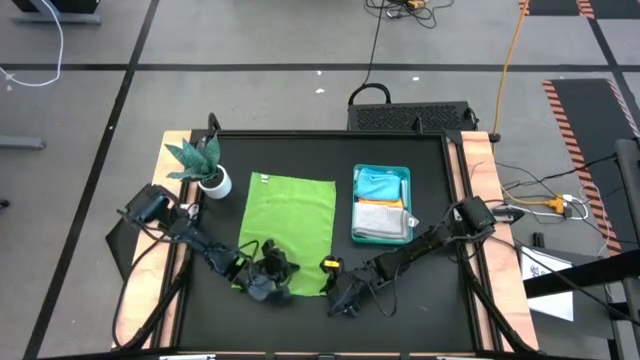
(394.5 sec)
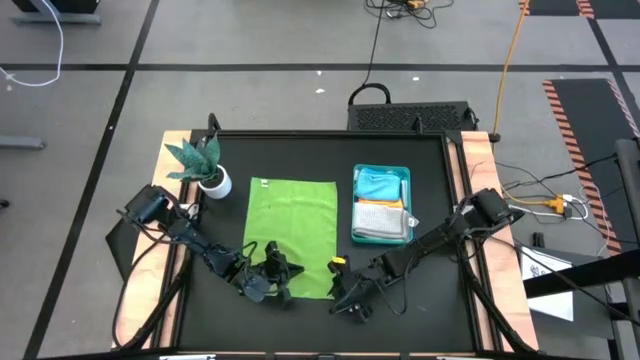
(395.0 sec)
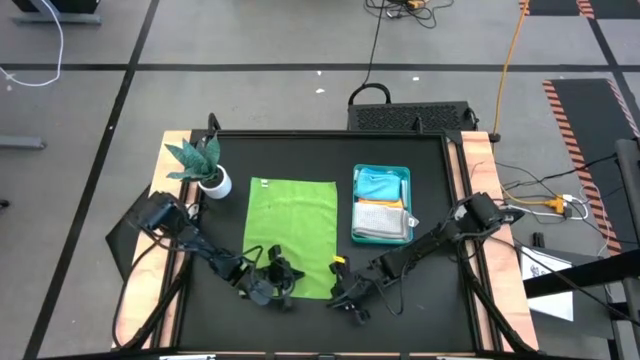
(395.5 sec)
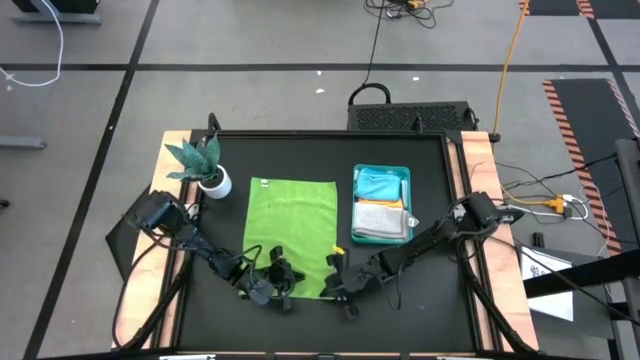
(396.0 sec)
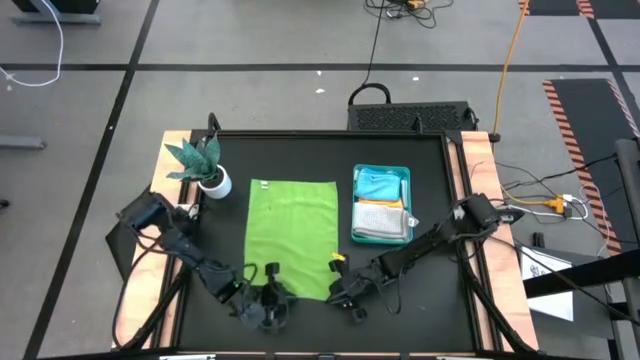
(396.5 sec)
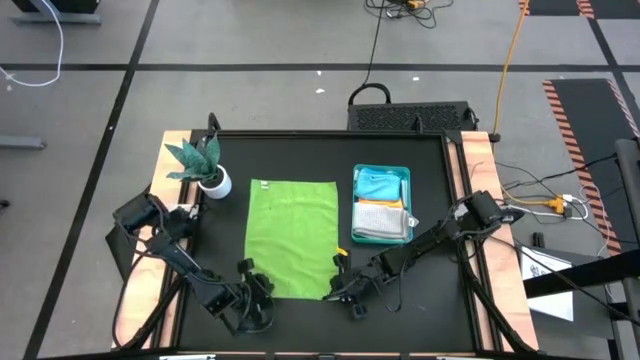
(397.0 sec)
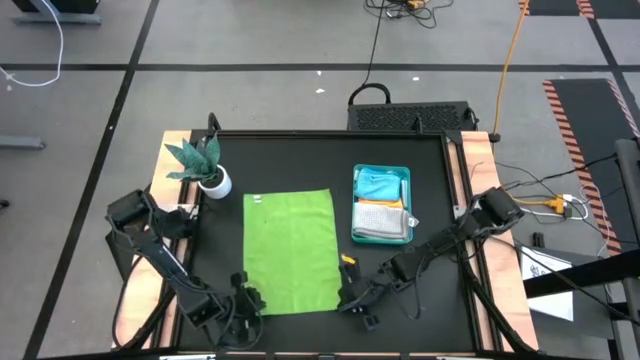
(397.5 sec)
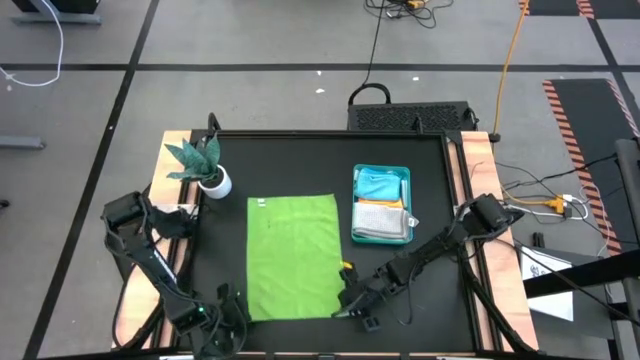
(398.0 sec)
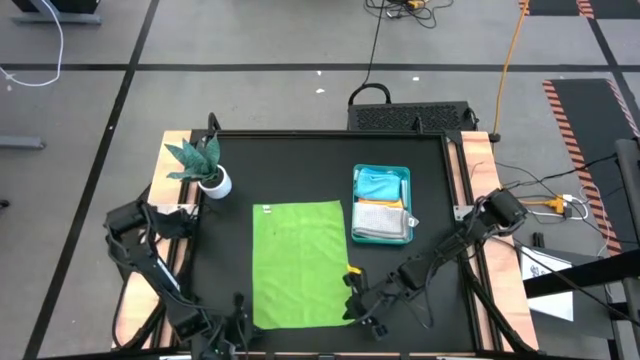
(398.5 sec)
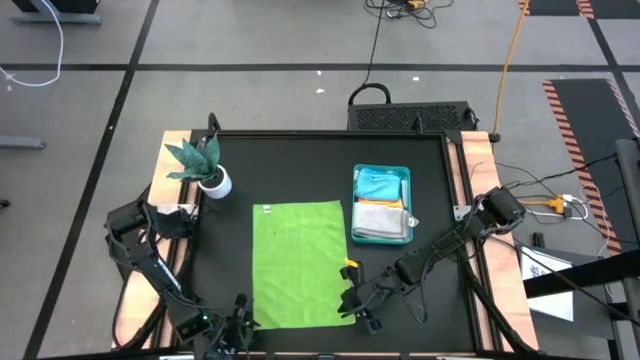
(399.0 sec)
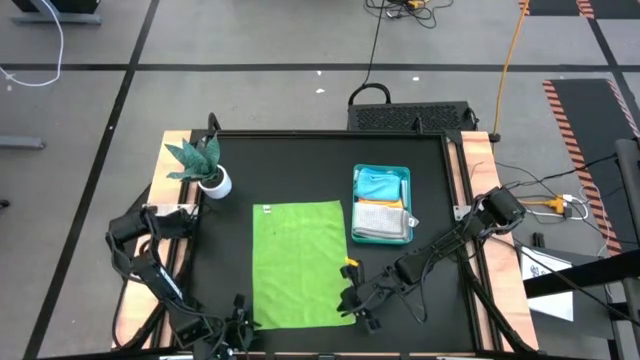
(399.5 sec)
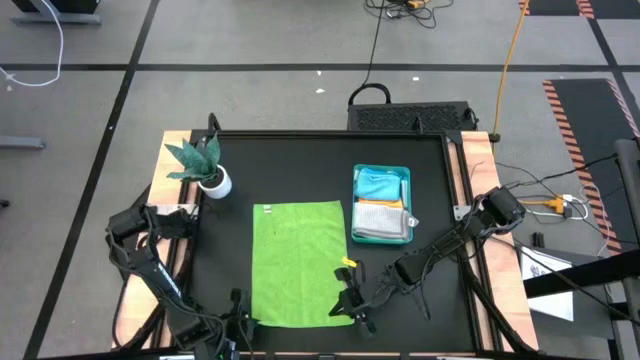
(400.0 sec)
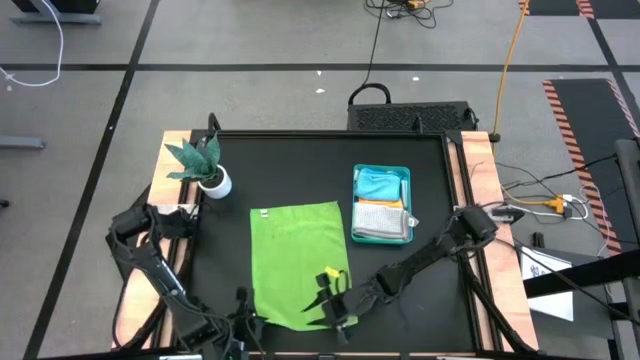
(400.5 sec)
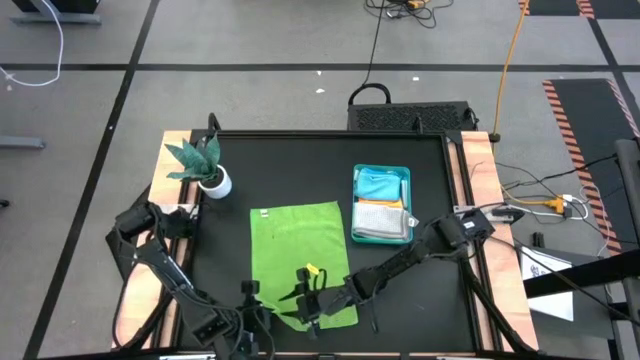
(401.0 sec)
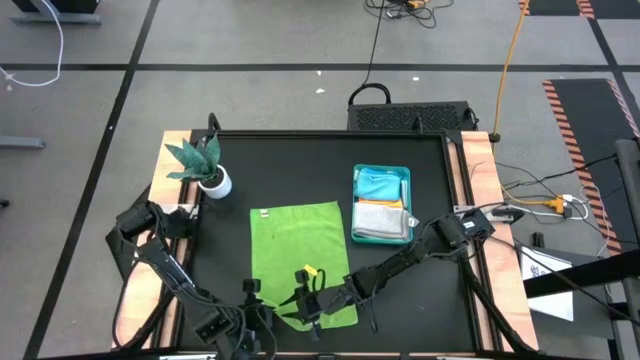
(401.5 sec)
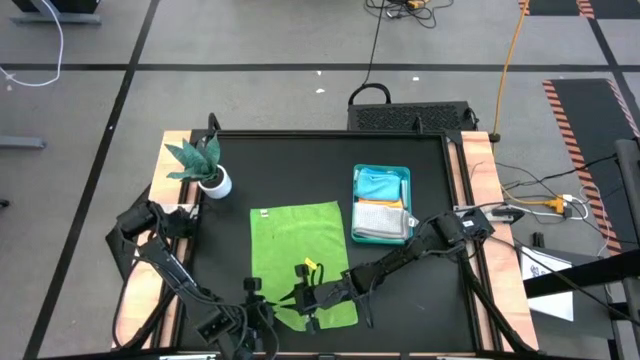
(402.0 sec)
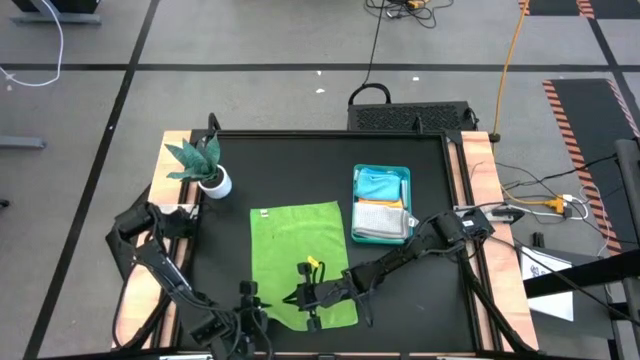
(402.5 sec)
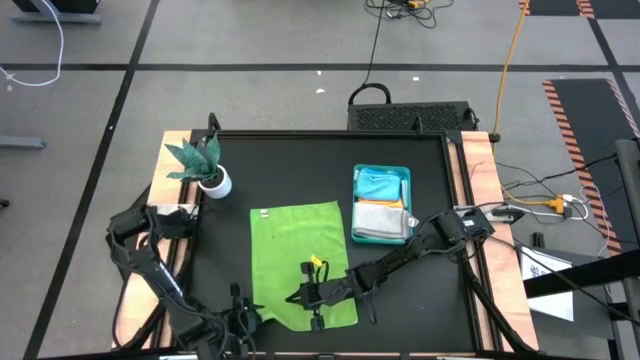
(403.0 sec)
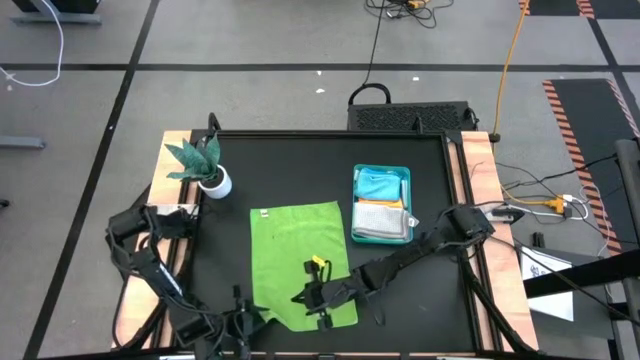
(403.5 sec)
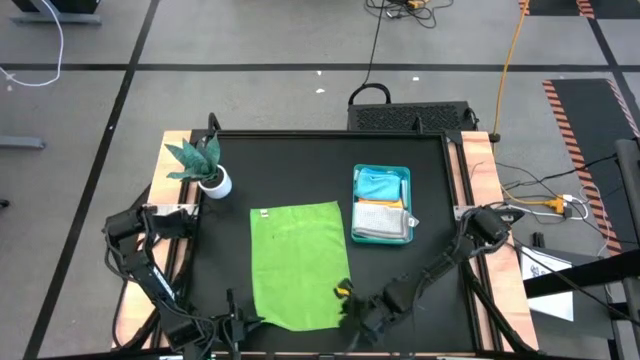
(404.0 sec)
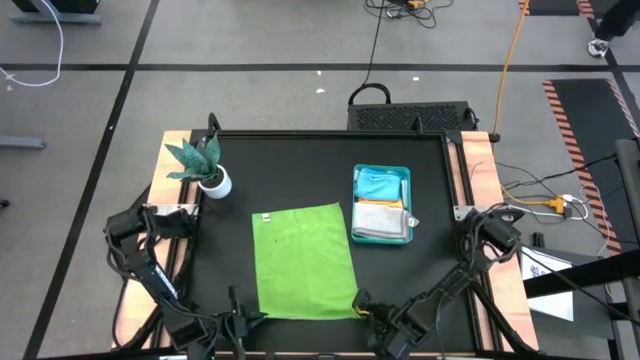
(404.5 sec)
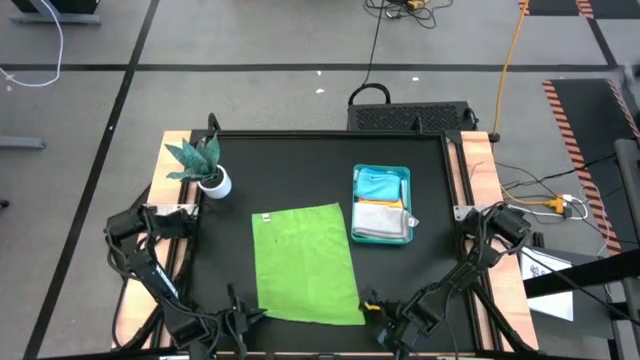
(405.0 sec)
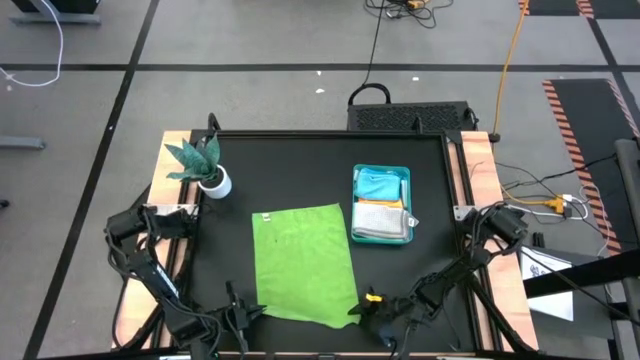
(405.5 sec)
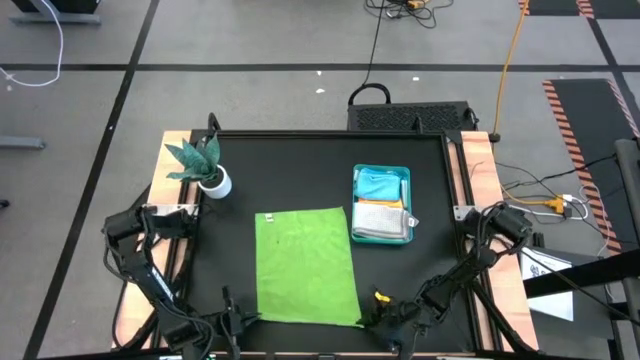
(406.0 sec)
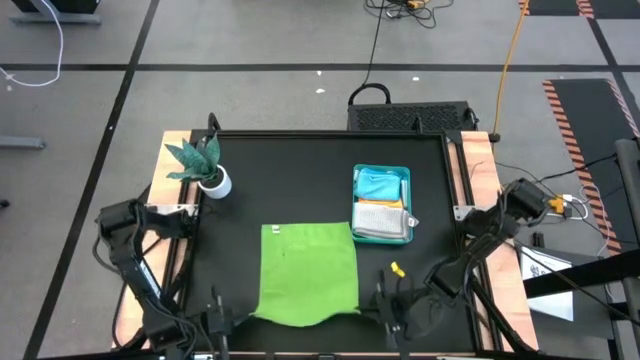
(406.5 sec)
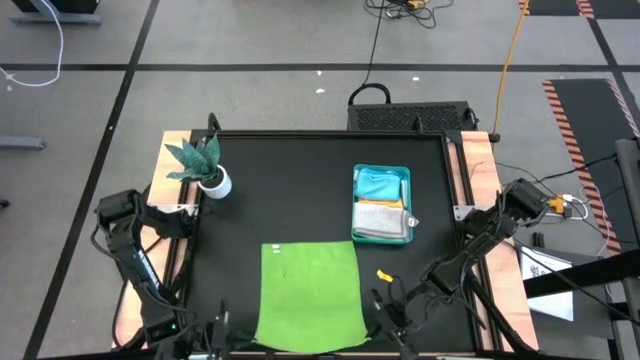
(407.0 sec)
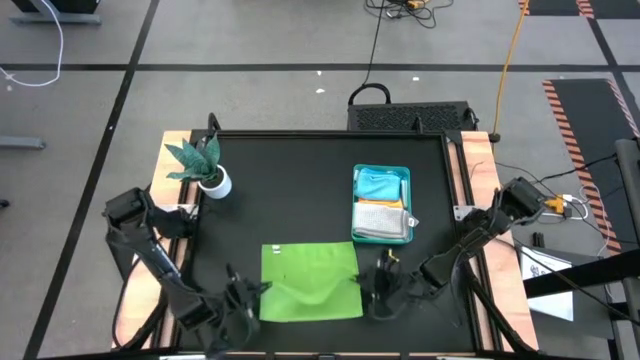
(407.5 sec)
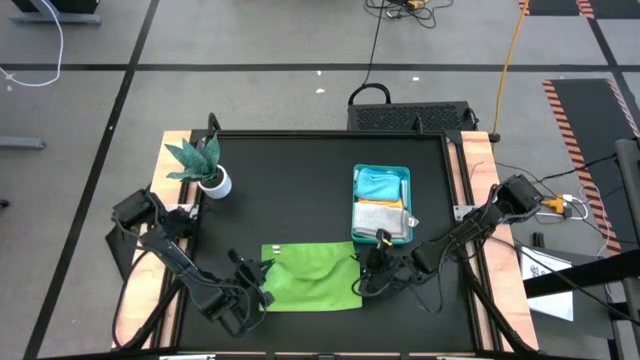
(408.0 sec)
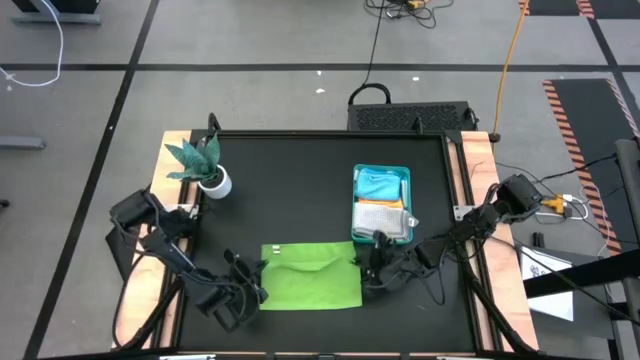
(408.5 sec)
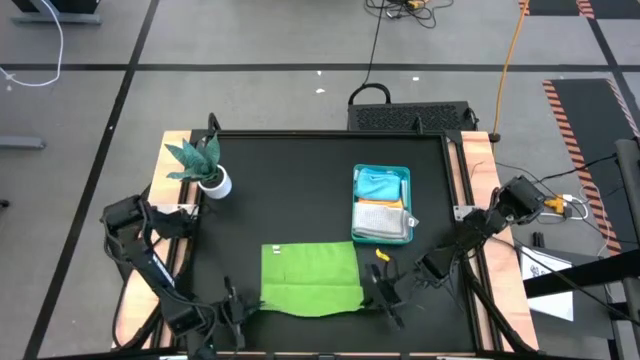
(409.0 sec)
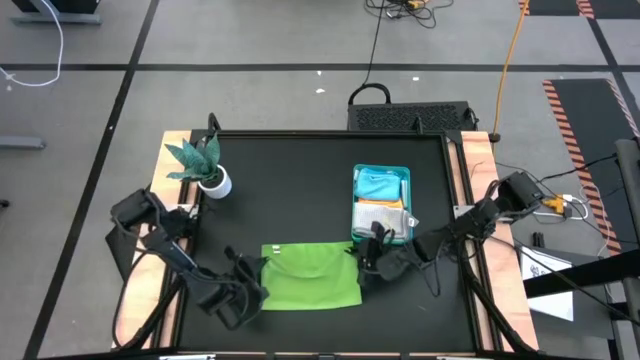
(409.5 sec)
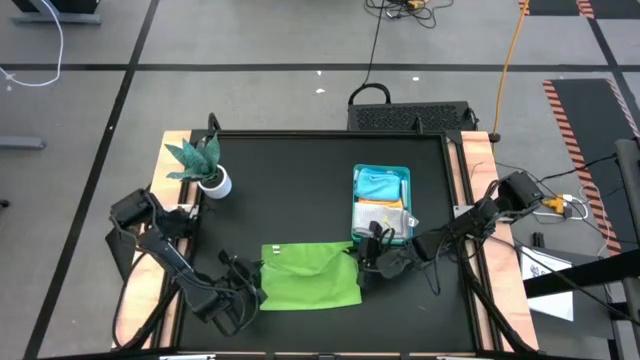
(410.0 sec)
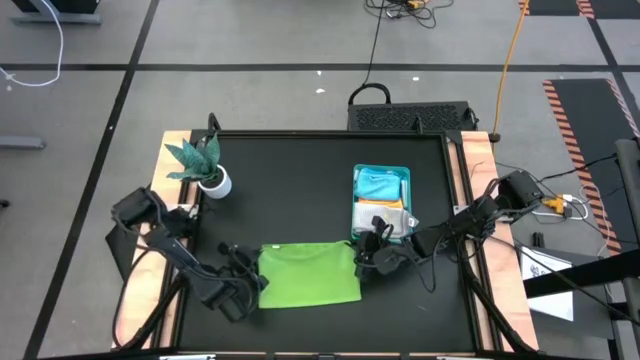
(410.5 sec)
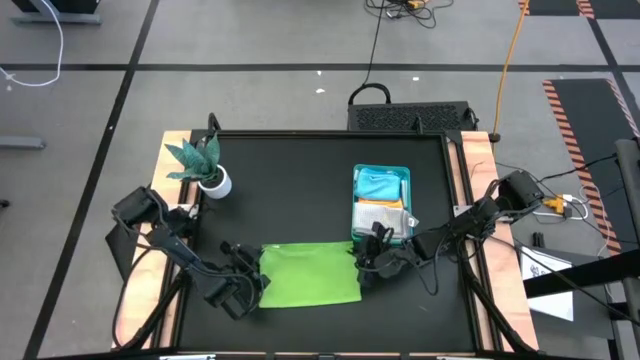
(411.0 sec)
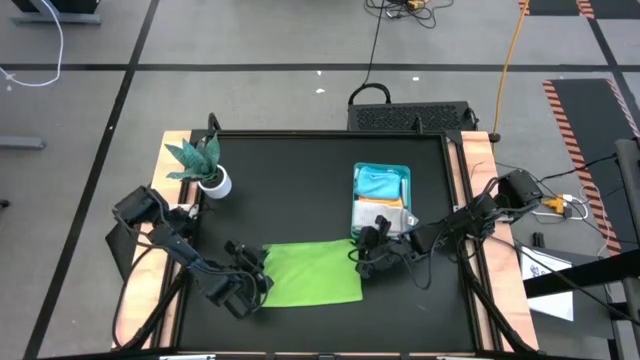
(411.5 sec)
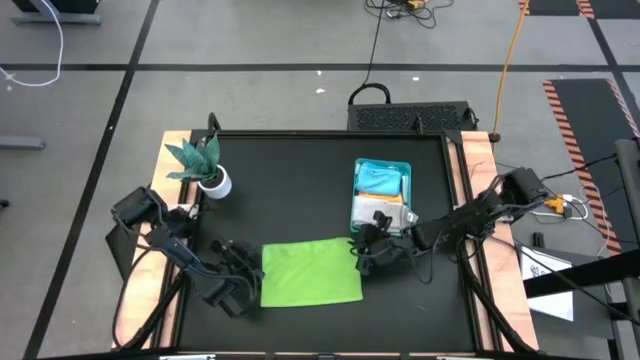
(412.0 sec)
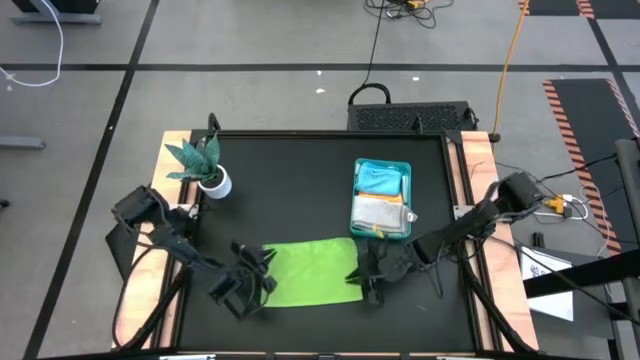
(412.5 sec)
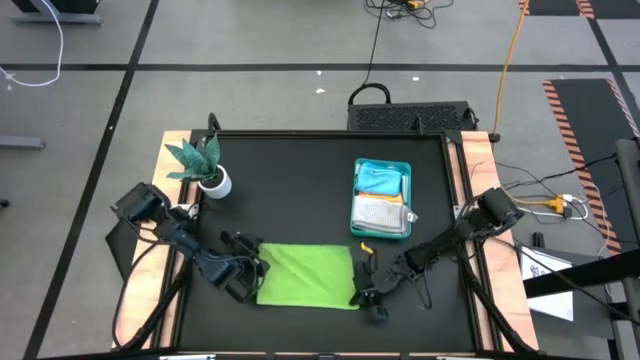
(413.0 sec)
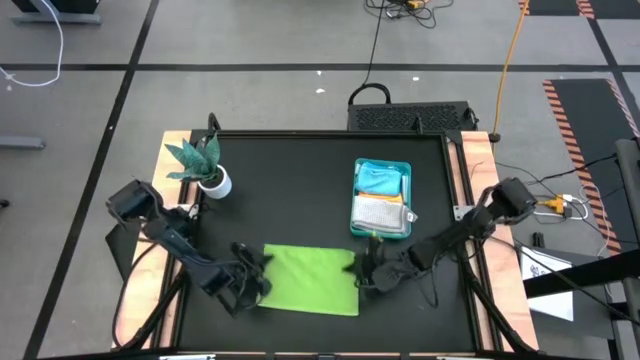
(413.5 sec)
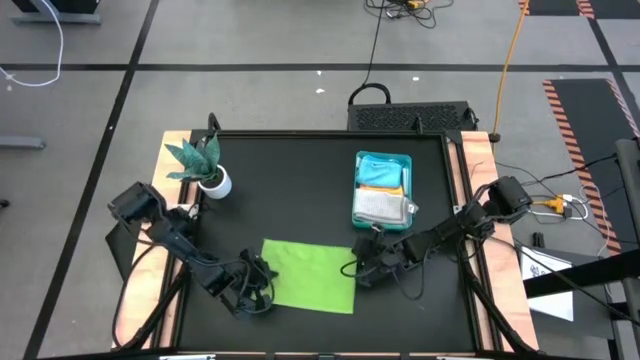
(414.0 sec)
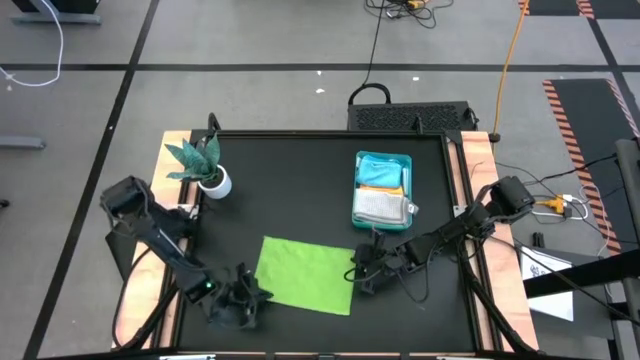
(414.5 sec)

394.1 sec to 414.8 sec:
Task: Fold microfiber towels
Fold the light green microfiber cloth
